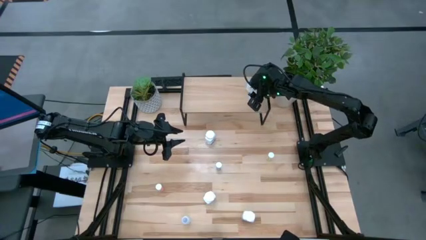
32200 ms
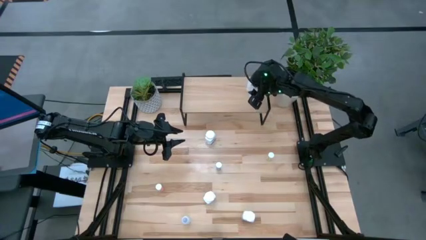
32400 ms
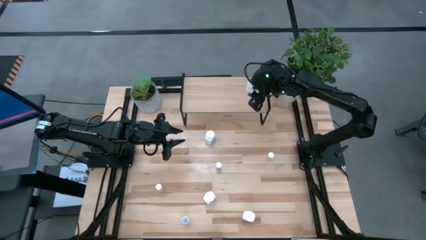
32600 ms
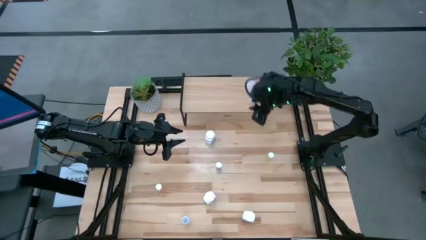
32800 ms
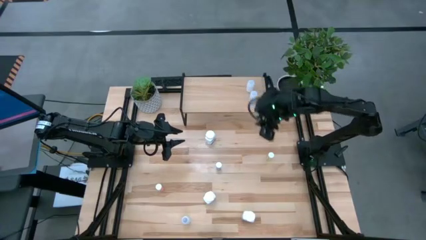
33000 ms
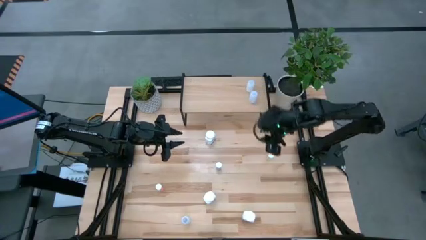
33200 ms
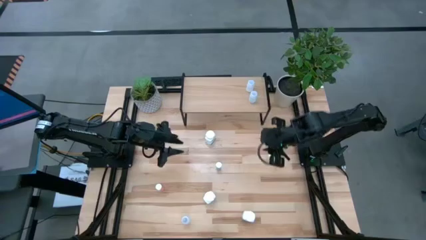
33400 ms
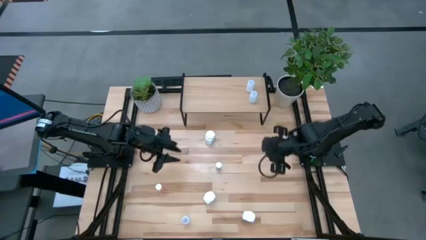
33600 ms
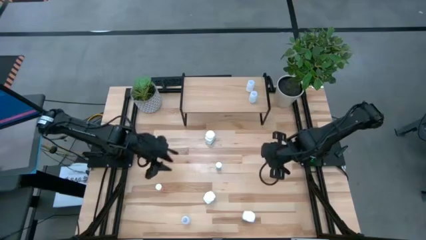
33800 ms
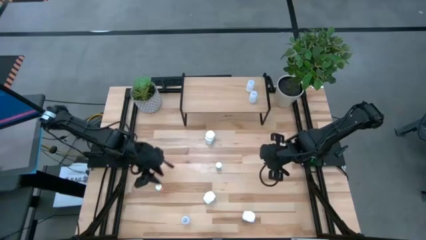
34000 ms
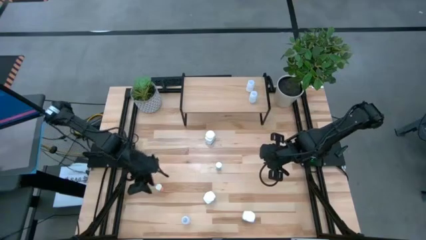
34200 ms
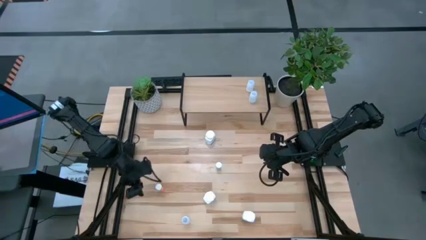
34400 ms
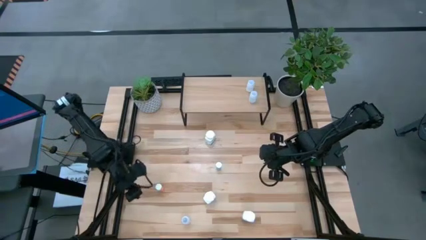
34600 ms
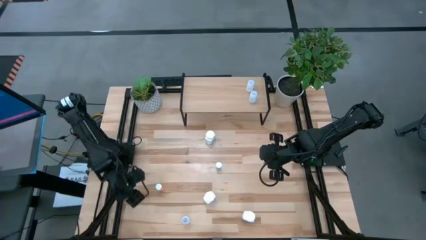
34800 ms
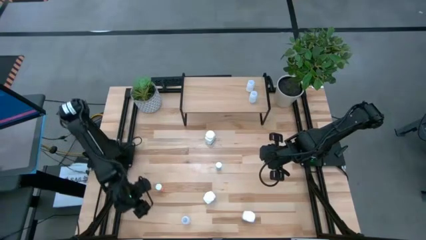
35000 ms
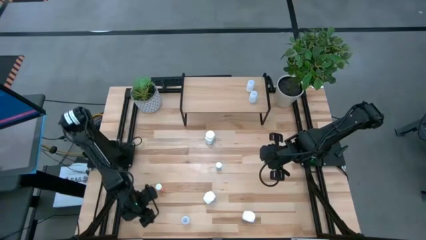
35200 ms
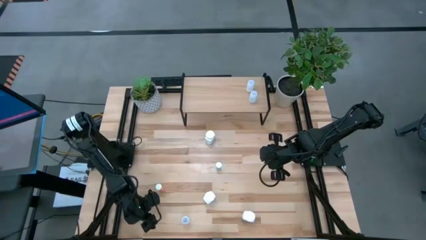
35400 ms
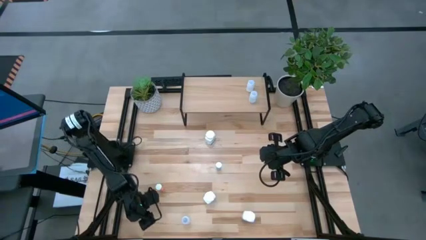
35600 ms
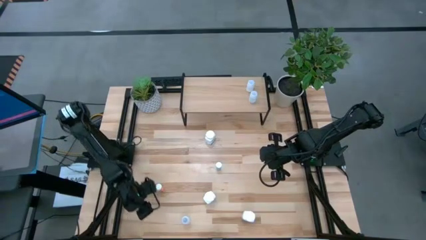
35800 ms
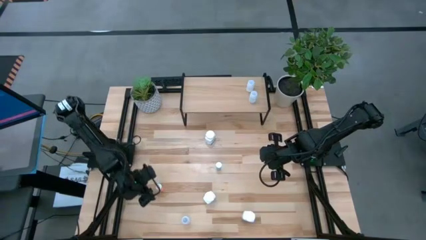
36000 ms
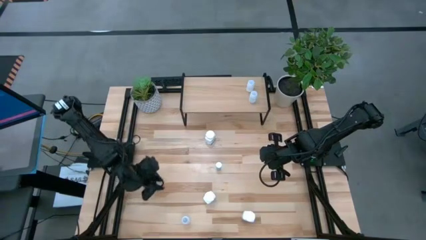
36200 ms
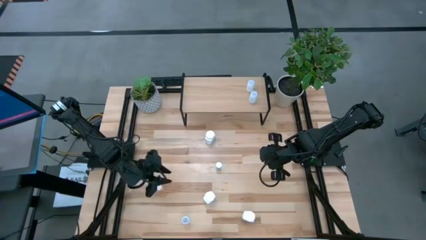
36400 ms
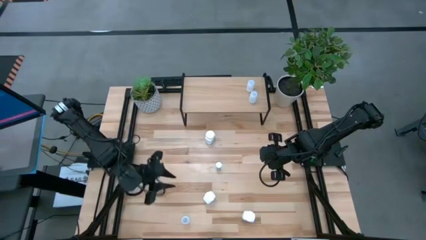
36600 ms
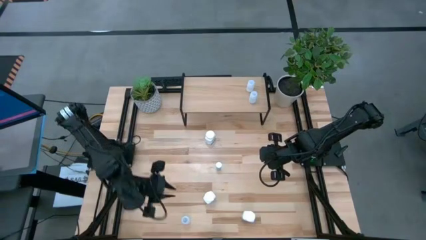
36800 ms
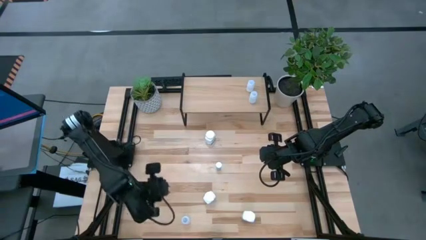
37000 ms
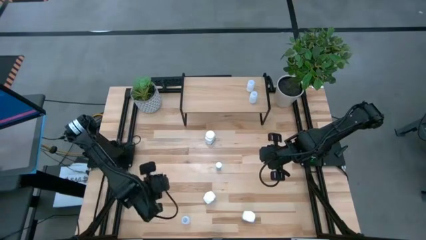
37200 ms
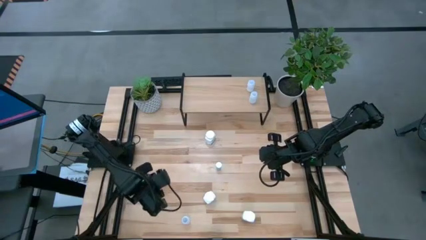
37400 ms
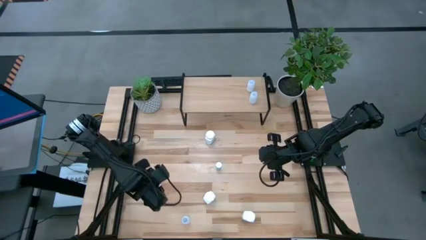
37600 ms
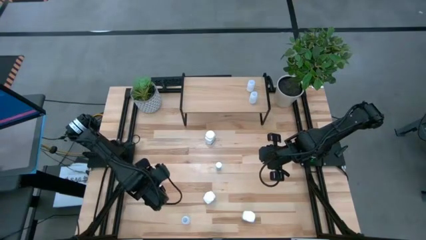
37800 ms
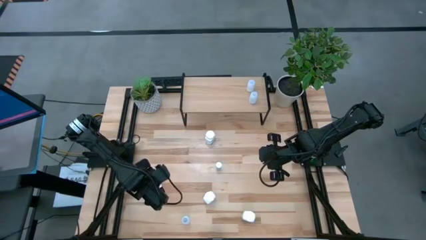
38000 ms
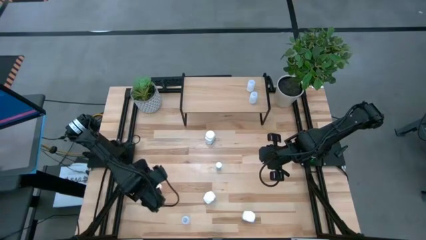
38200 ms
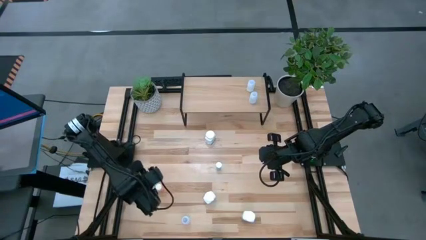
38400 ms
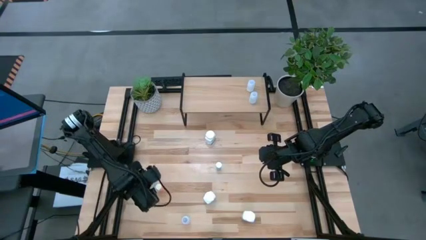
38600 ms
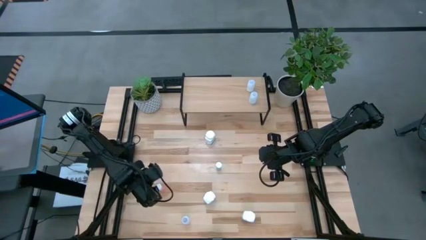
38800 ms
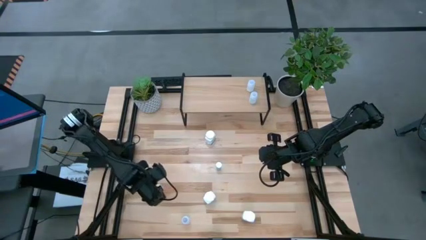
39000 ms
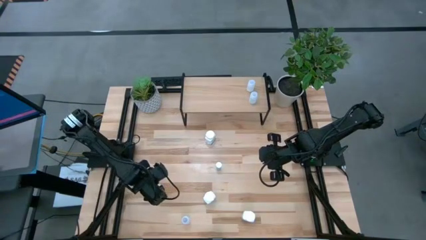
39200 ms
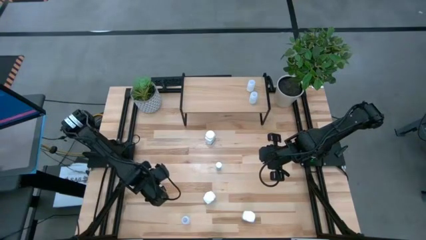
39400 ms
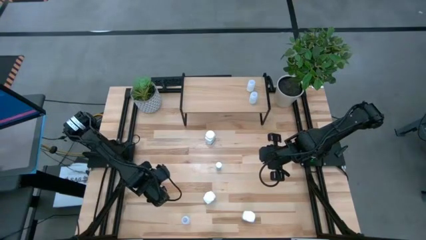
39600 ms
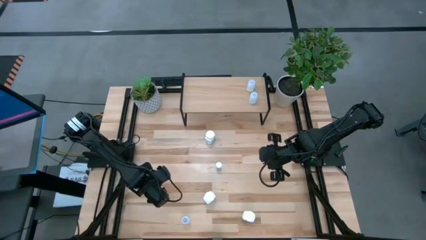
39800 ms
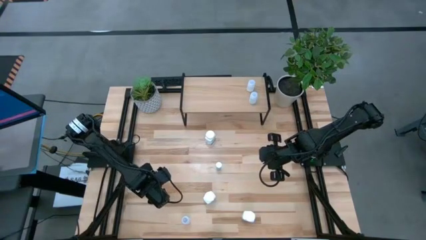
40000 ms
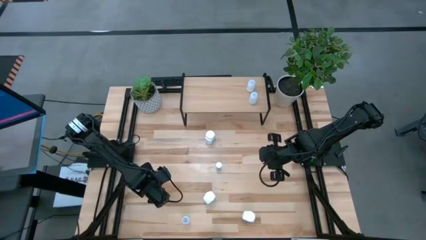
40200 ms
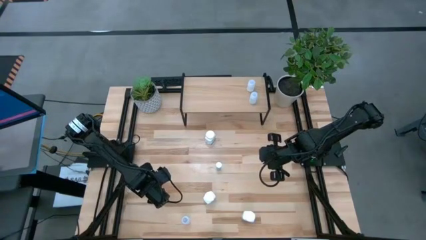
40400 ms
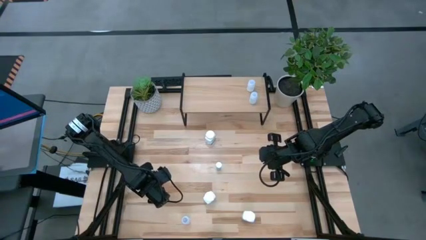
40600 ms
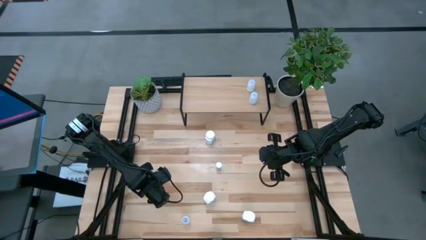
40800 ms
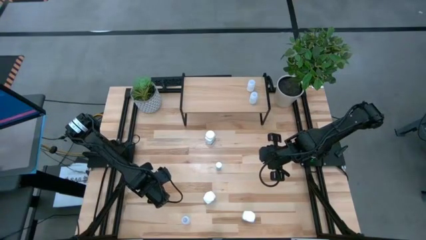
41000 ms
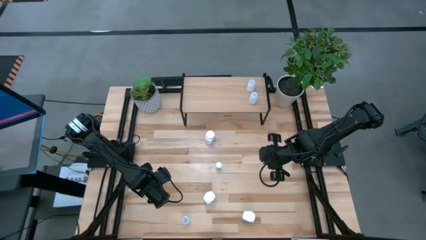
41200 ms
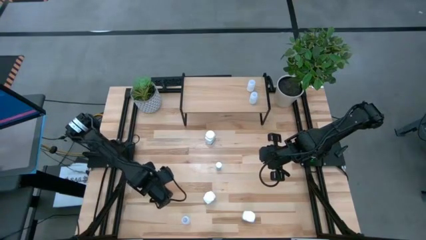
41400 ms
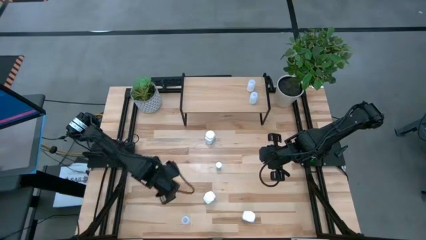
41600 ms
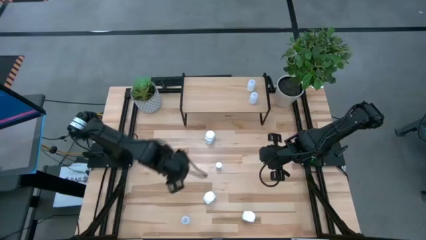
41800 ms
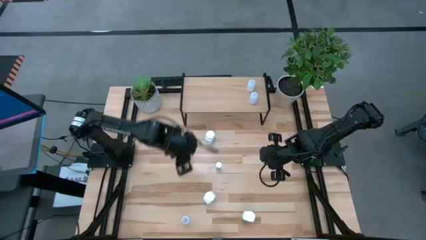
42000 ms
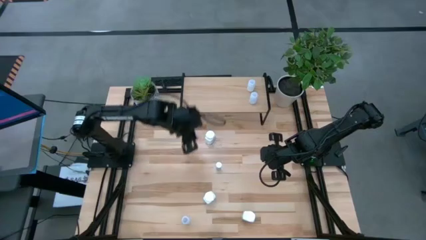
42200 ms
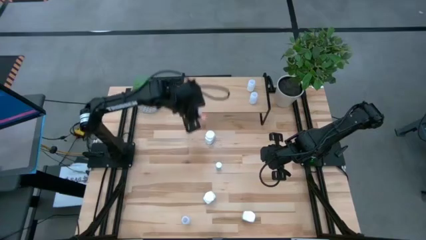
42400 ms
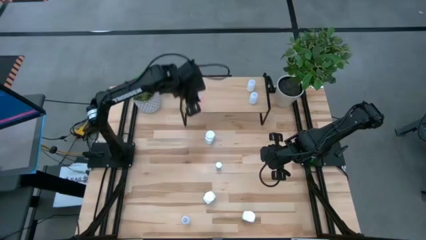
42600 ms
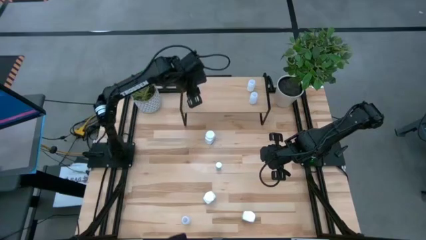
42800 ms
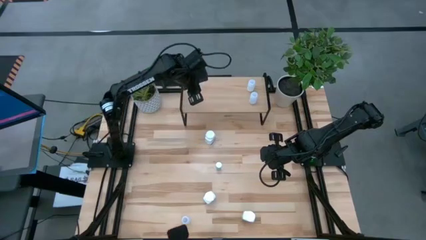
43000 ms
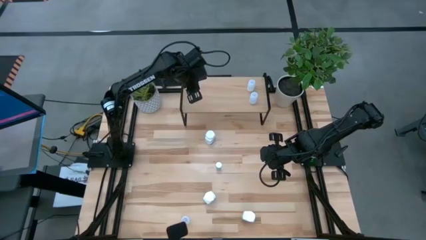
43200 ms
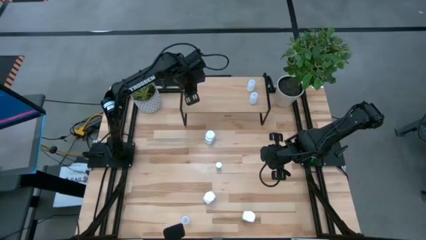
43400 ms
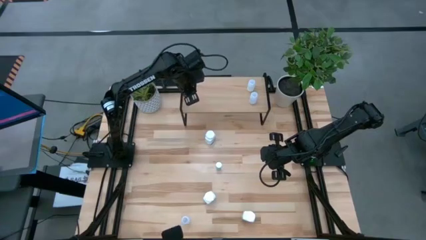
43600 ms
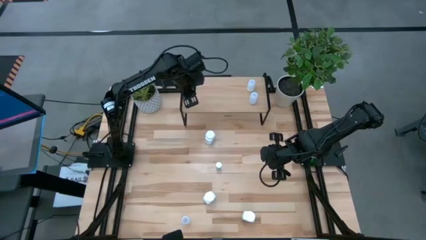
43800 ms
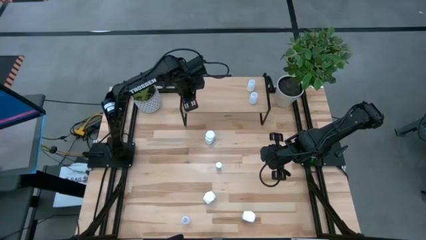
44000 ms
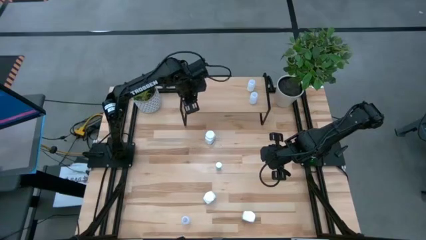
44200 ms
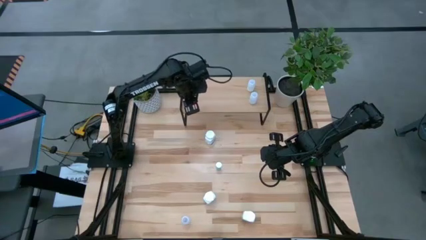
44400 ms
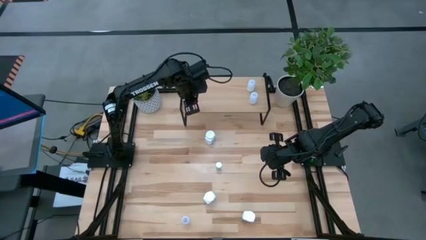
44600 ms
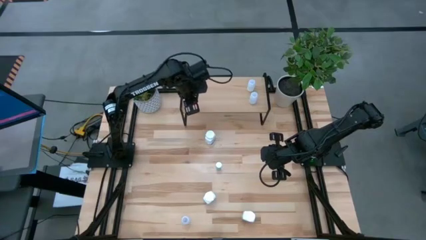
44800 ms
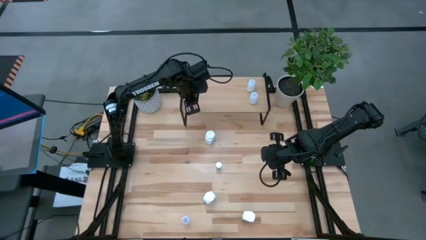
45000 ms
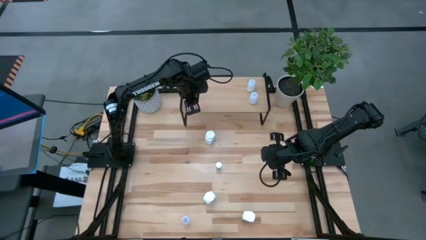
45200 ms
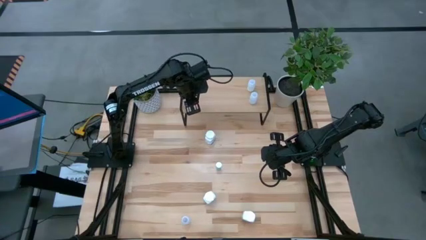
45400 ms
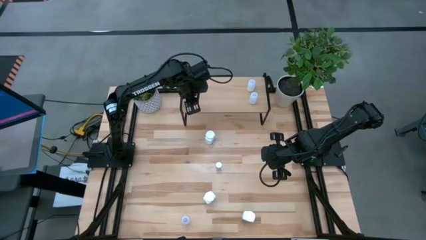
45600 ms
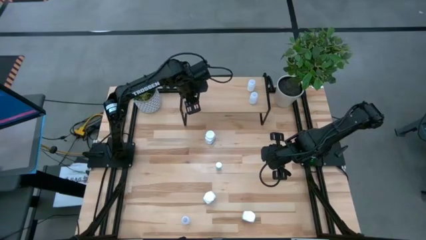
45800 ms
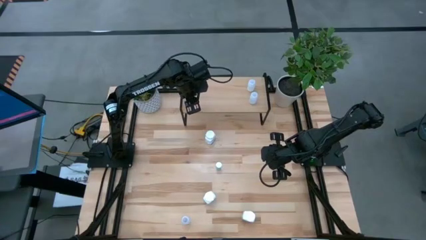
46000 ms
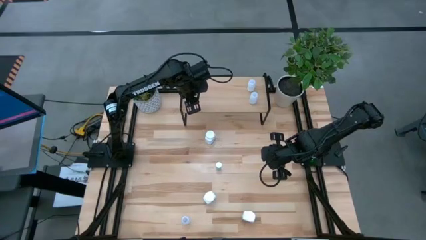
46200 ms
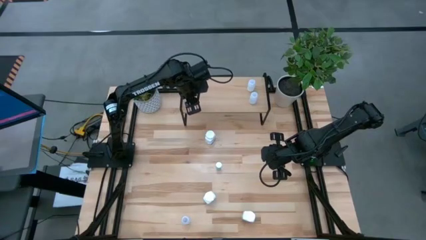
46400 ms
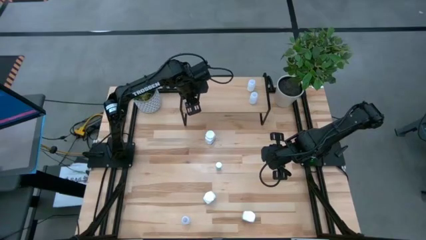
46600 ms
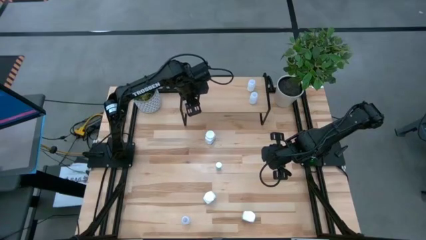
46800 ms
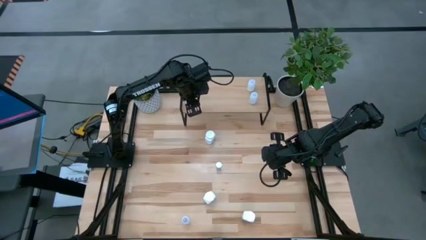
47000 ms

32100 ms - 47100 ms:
Task: Pick and place medicine bottles onto shelf by color
Put the orange pill bottle on the shelf
